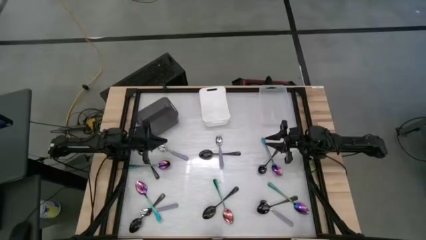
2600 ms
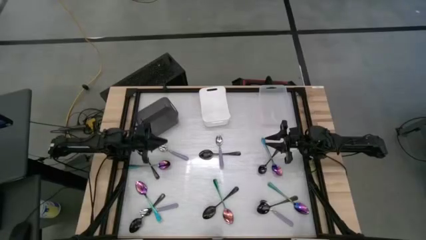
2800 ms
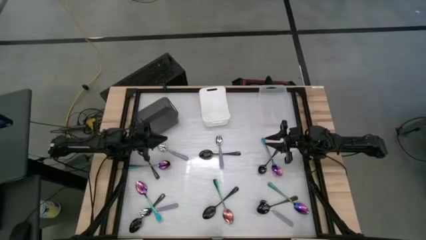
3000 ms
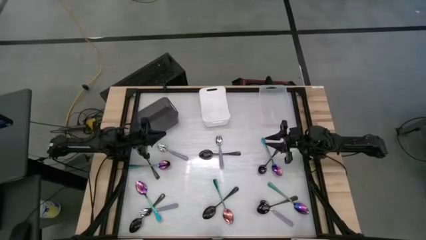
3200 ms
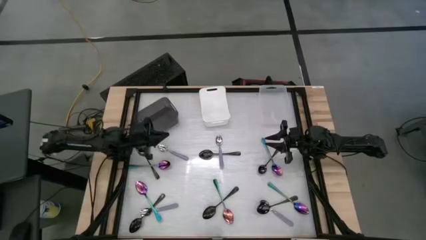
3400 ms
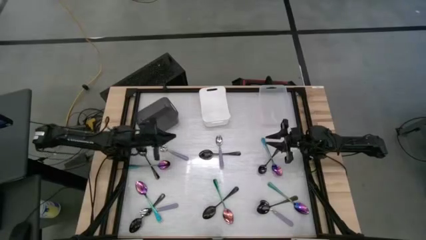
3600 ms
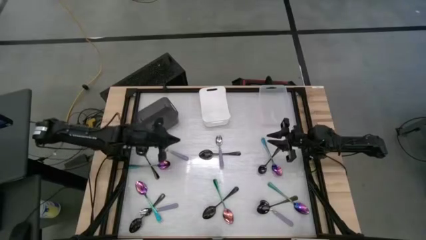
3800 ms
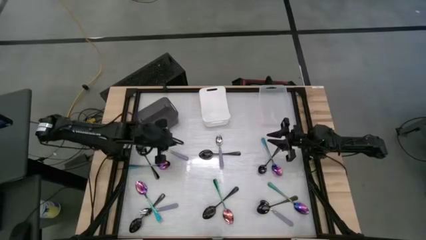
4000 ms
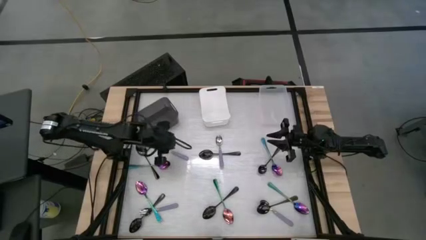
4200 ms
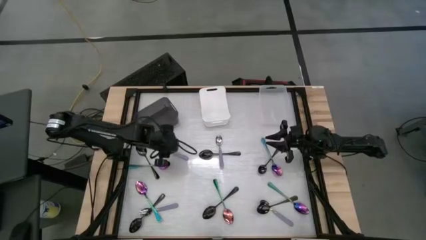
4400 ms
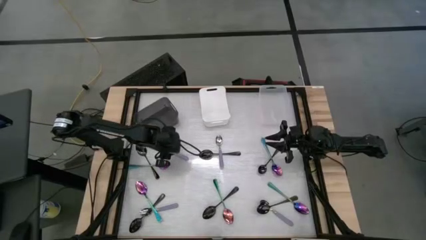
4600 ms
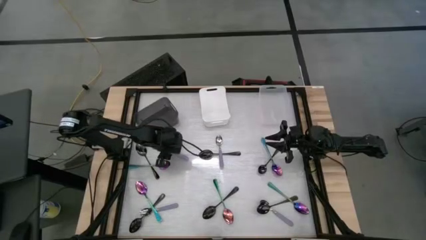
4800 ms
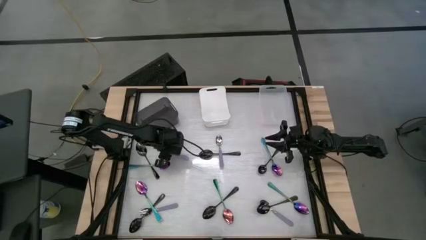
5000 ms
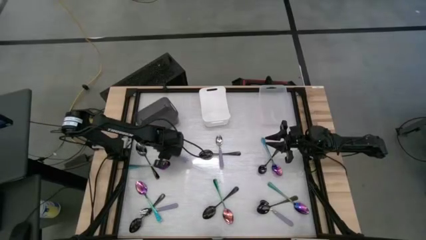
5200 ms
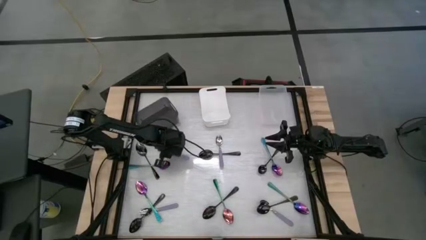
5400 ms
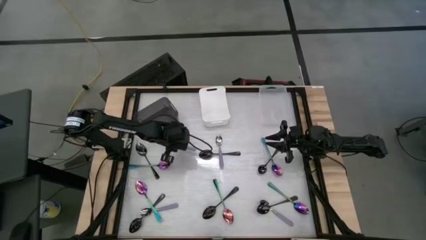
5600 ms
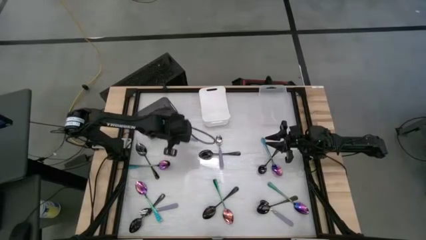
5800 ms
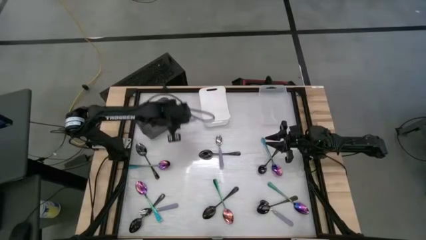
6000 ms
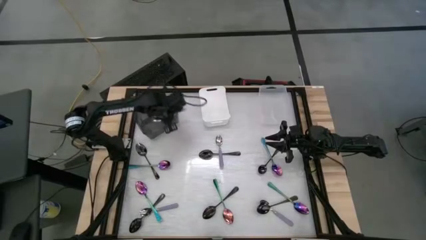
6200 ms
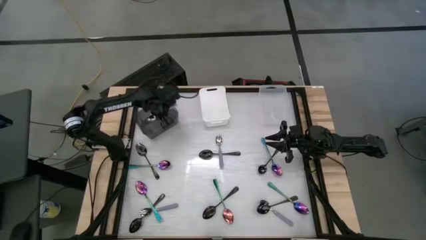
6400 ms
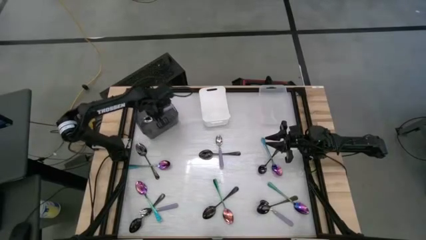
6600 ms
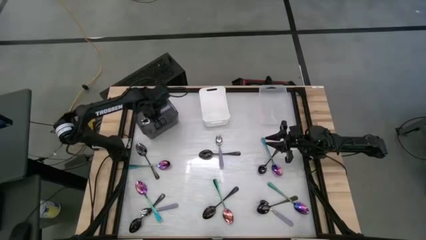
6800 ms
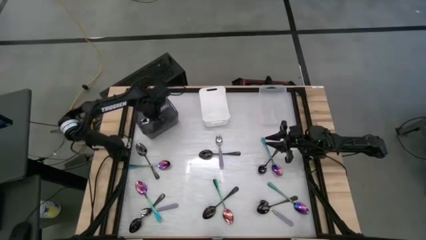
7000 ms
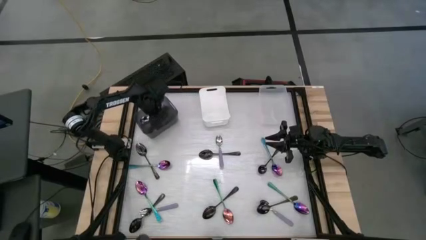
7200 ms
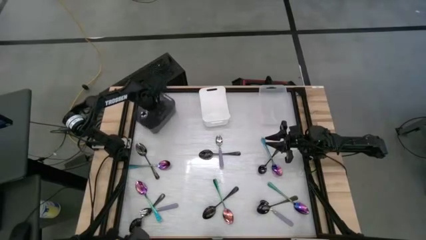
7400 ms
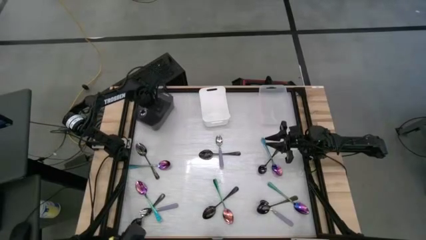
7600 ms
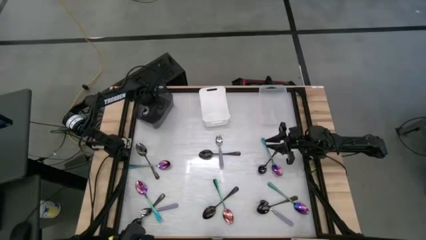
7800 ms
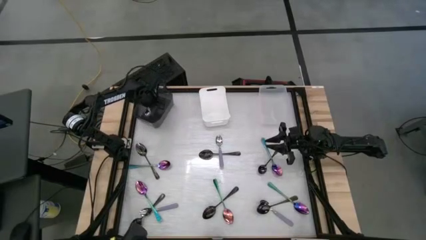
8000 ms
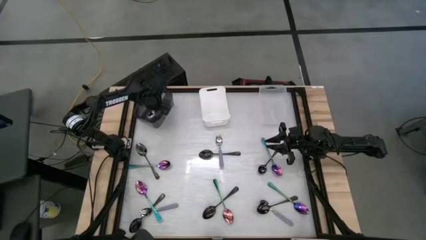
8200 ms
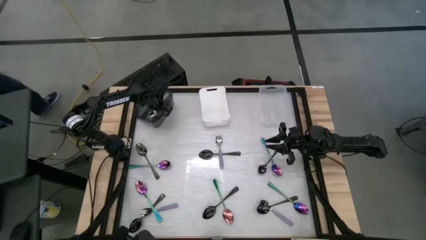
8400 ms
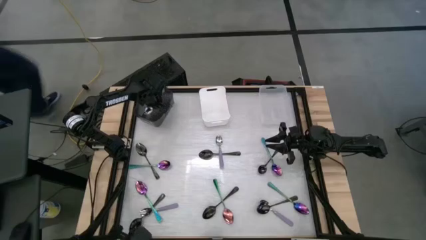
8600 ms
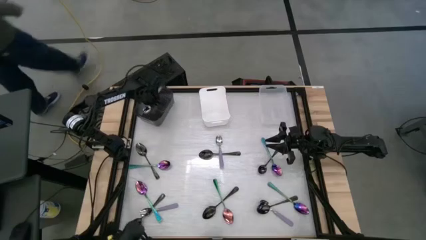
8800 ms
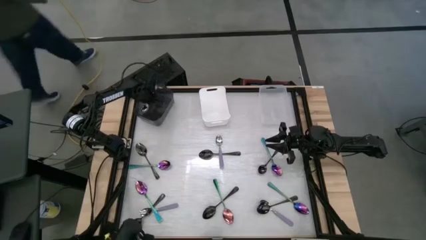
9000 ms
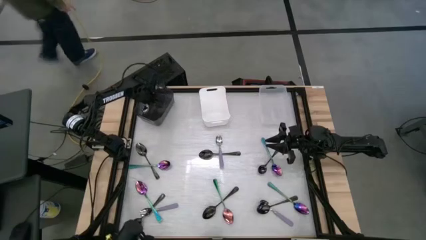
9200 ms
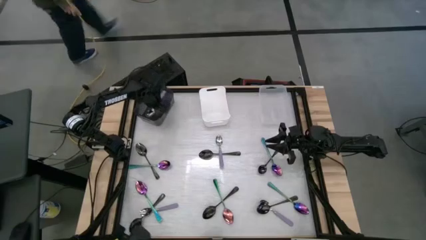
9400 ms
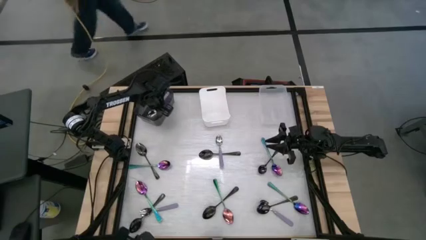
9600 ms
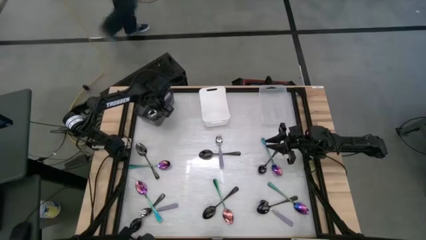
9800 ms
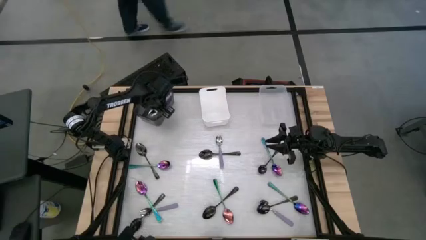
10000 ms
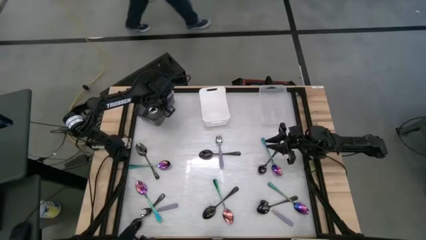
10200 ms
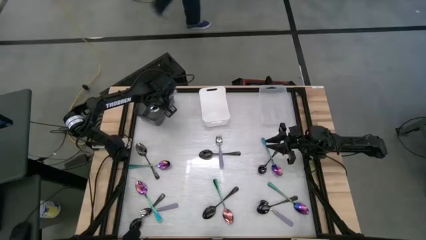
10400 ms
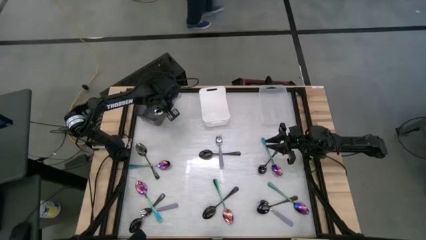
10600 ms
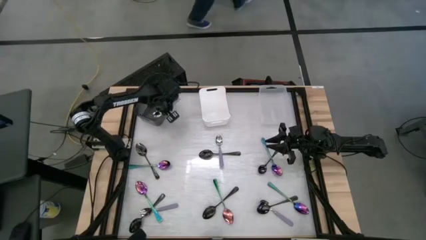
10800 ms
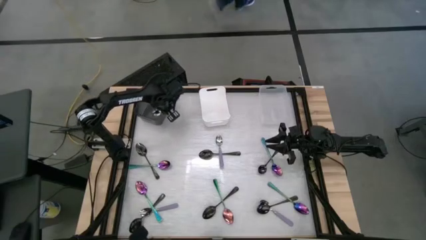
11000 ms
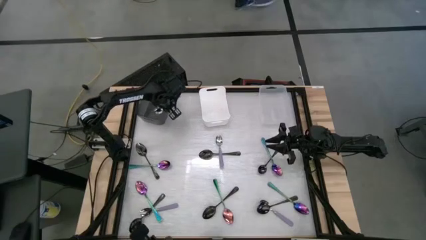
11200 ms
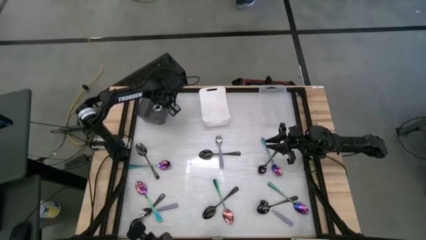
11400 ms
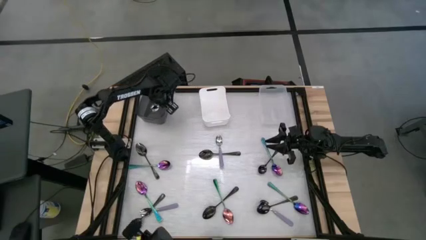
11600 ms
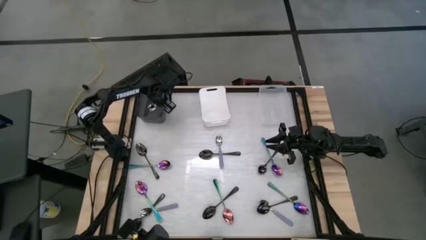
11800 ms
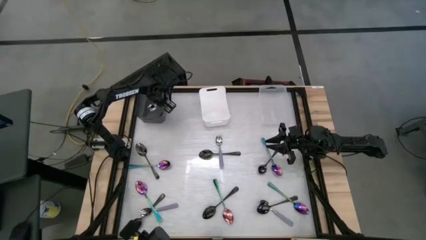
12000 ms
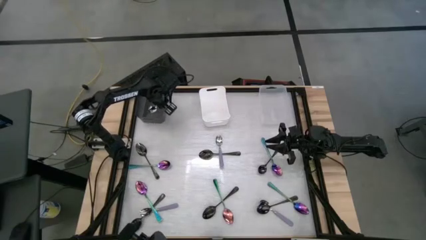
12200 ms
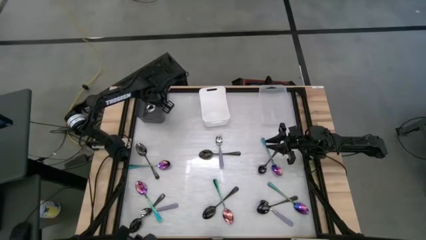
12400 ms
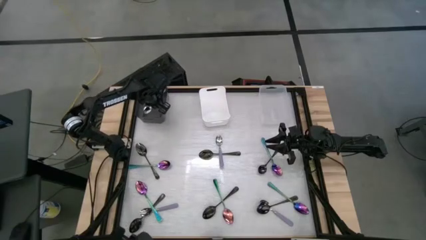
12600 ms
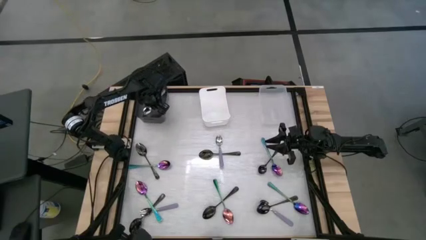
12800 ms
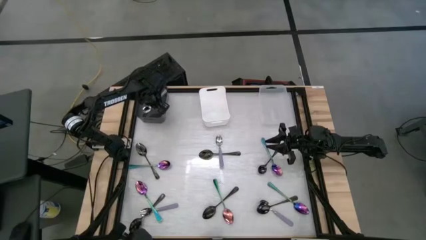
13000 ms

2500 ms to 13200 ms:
Task: Sort silverware by color (type)
Put the purple spoon into the transparent black bin

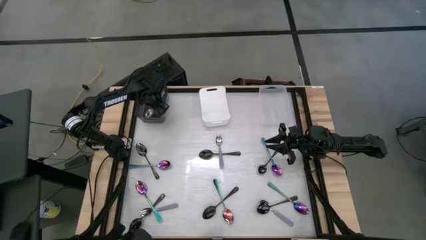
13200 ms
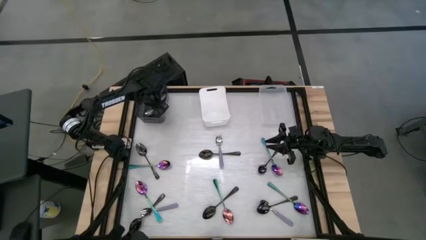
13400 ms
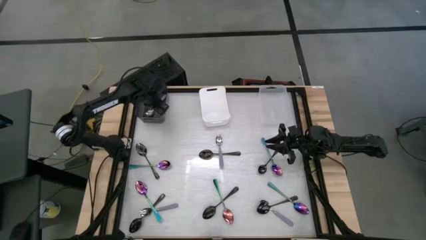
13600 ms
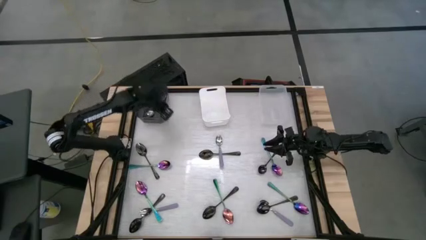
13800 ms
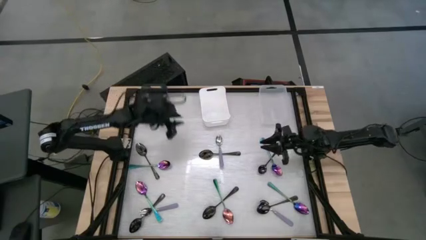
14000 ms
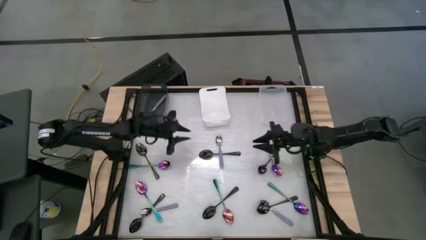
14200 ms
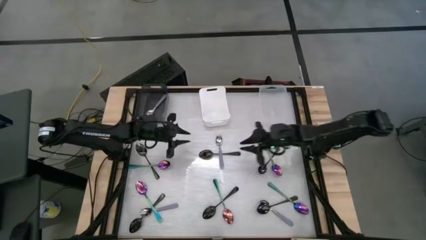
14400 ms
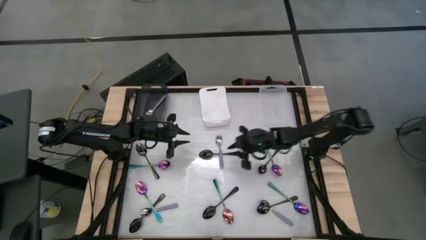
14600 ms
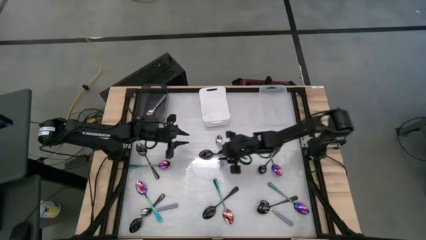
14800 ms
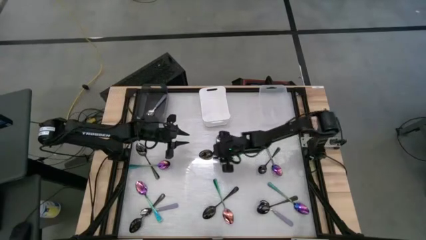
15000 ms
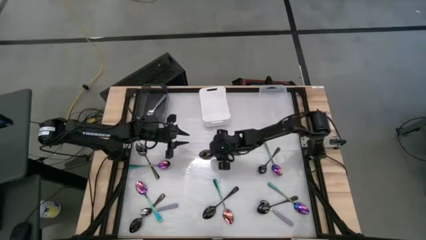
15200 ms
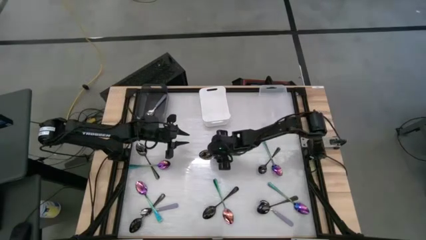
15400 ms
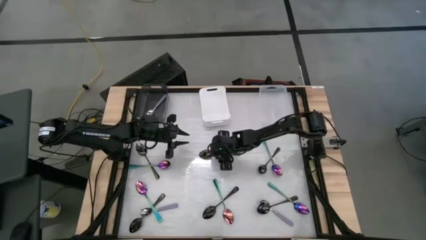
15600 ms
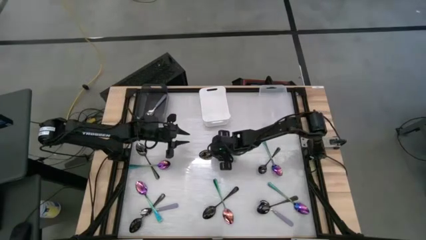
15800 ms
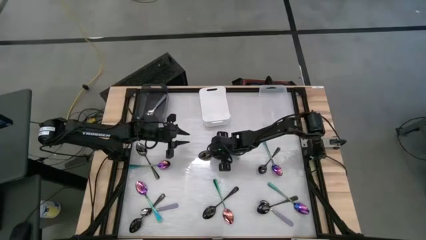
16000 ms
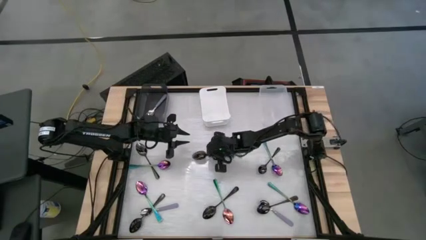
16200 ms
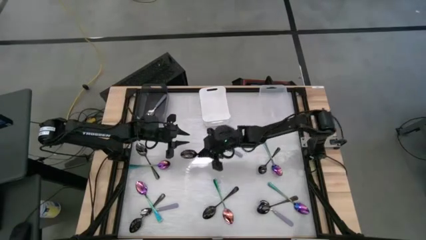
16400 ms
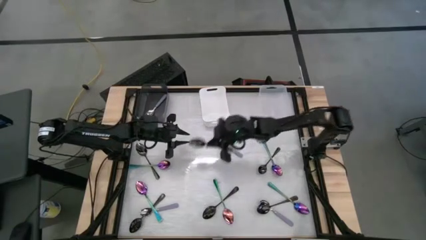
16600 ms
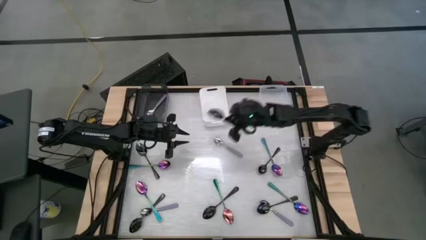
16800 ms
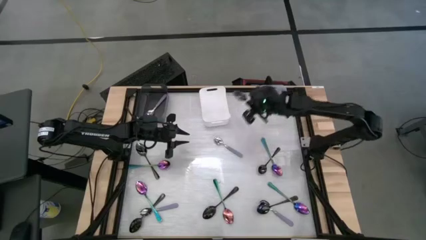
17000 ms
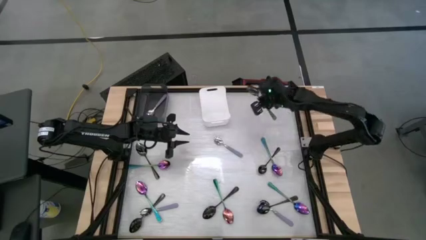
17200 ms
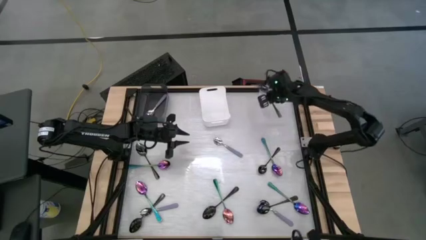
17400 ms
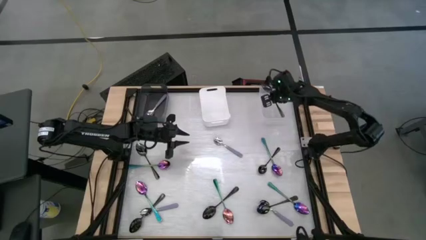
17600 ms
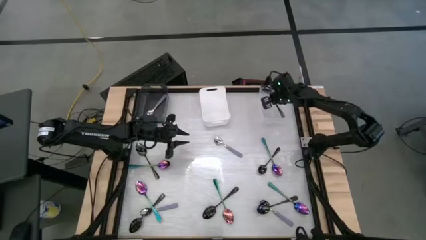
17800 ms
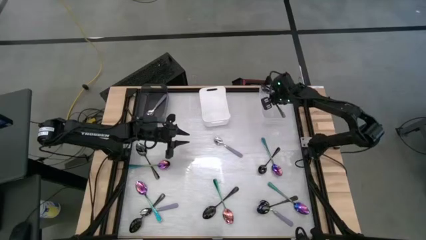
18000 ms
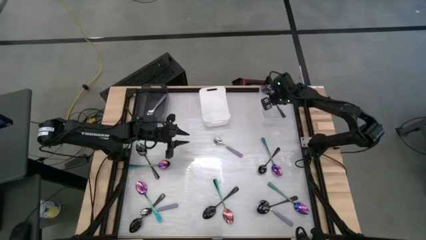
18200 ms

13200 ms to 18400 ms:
Put the black spoon into the transparent bin
